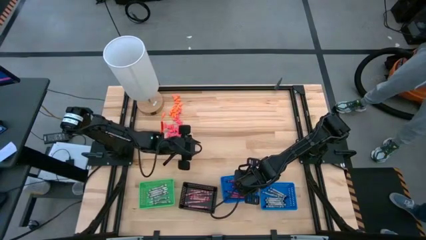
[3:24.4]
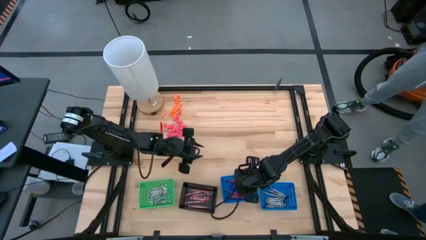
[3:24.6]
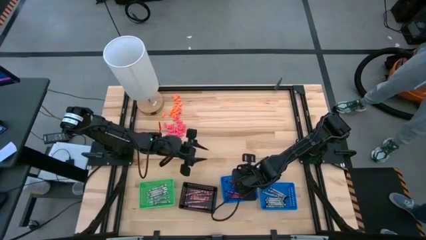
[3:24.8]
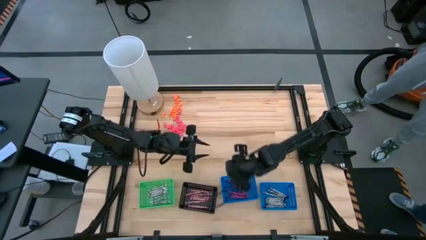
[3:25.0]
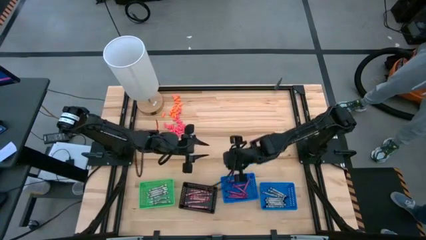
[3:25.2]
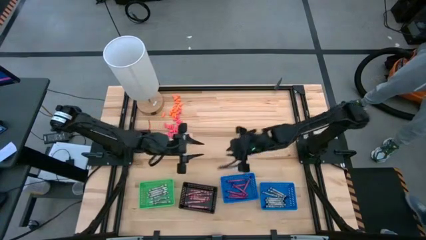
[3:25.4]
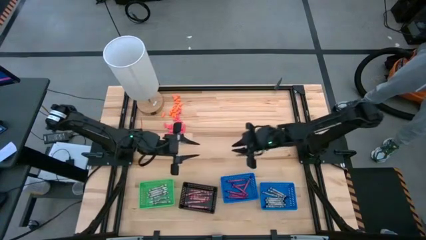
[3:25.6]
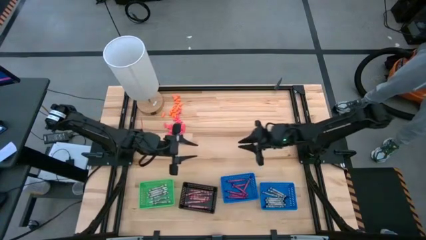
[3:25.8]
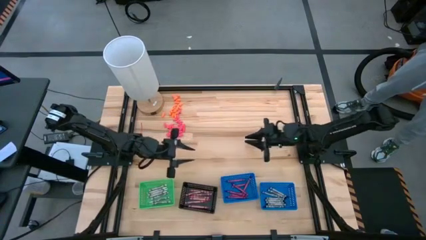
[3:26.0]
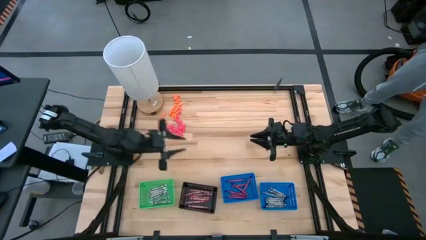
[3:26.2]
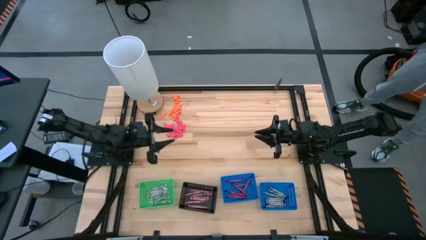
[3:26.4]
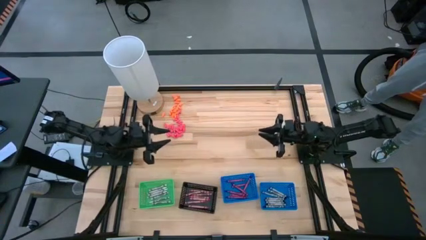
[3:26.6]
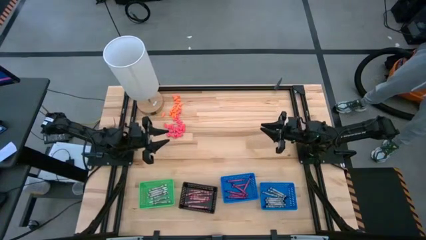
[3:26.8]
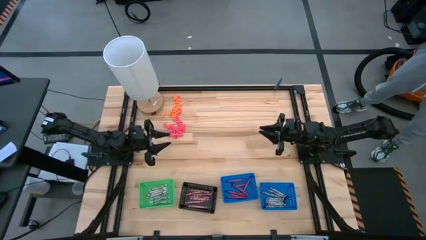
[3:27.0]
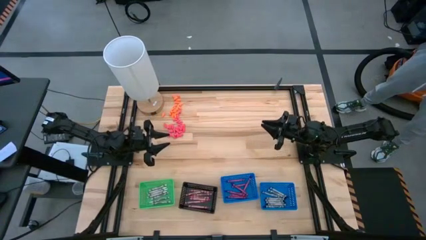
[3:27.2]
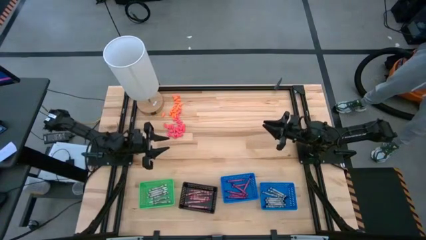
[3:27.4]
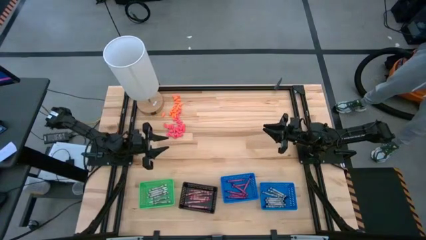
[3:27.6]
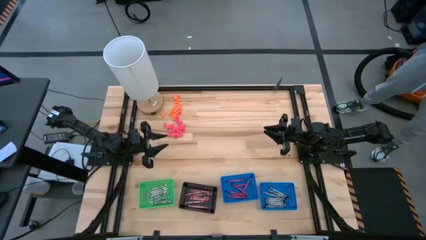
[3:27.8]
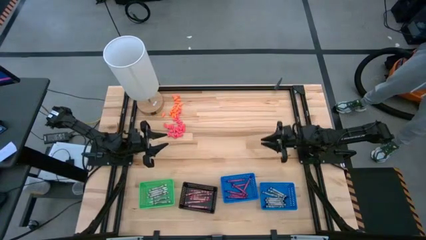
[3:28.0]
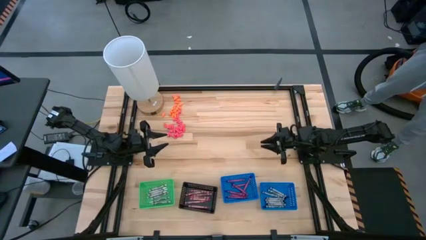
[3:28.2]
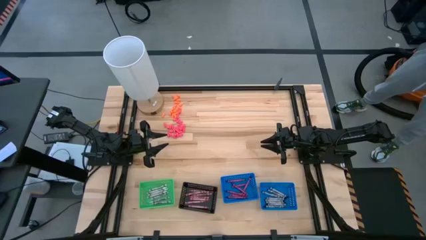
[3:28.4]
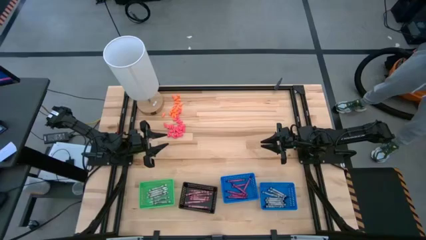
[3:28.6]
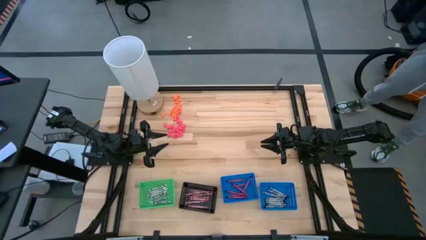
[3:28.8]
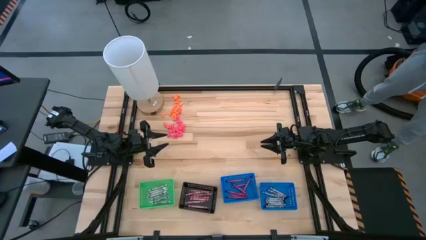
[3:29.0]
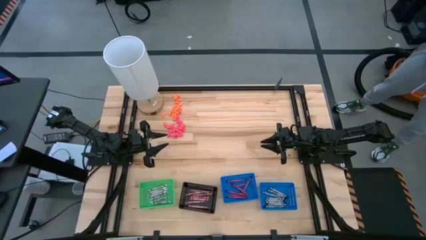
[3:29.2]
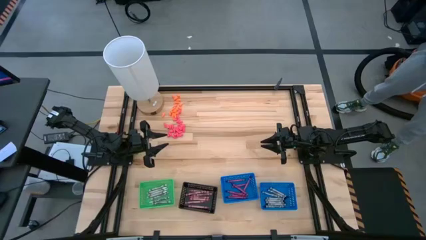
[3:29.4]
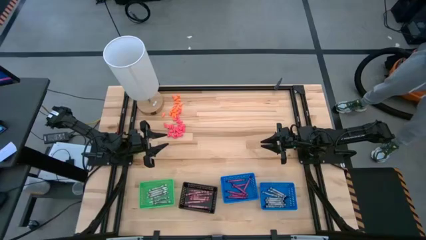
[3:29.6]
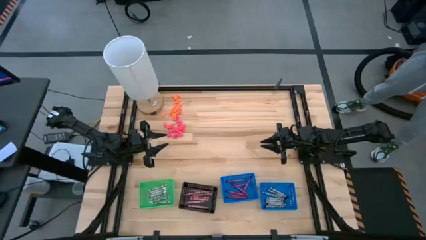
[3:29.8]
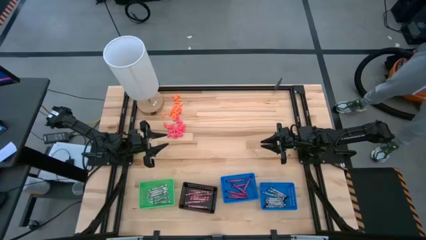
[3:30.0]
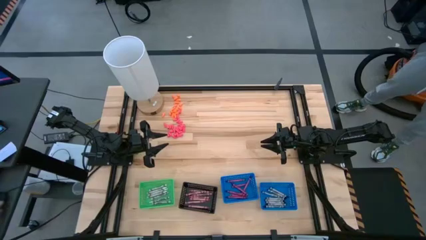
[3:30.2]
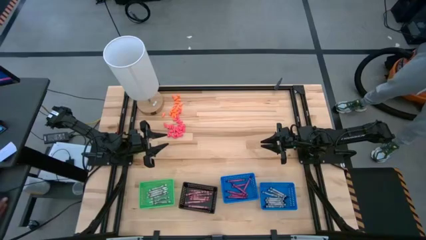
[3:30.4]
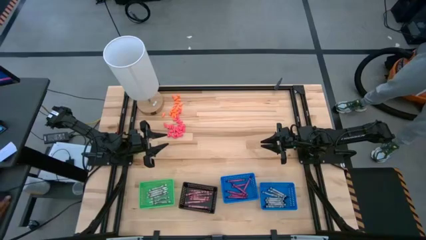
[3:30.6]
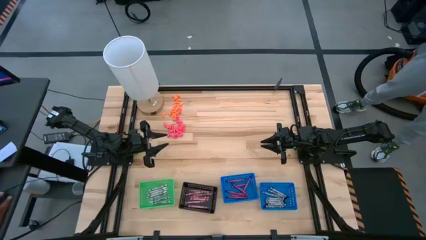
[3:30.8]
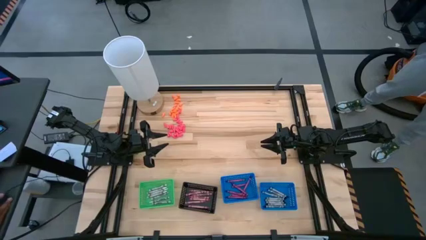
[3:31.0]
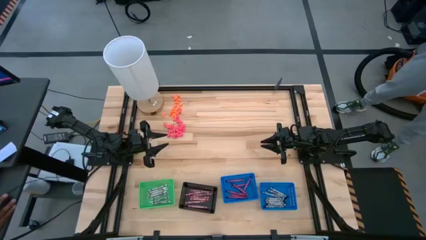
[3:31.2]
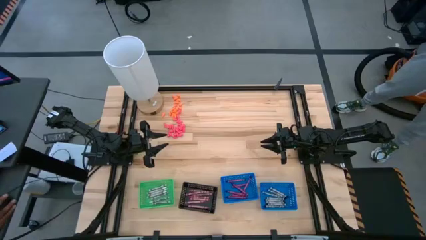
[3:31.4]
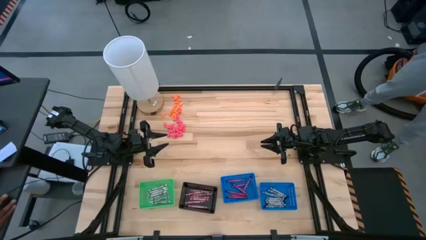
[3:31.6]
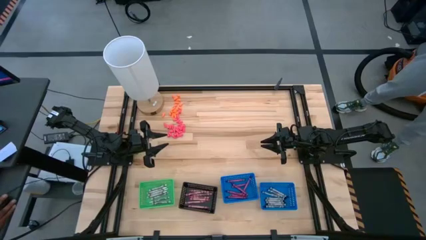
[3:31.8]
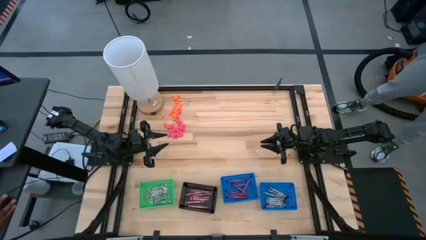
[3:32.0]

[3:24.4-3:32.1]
Task: Sort crayons
Return to Home Position

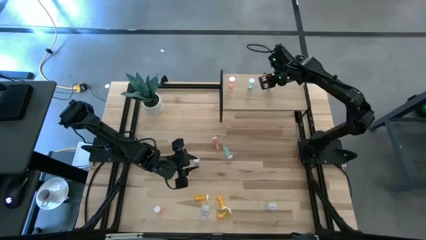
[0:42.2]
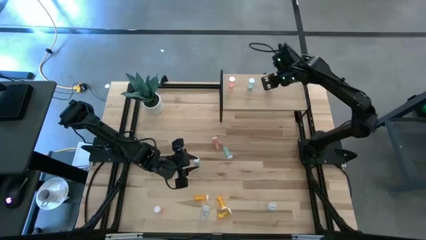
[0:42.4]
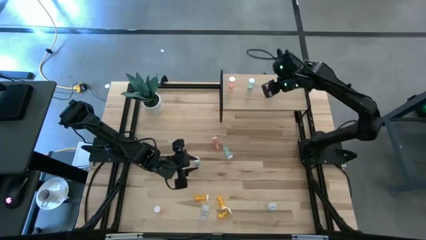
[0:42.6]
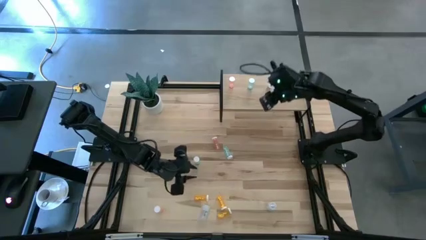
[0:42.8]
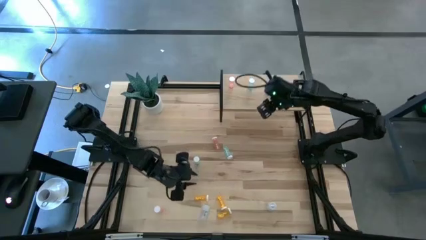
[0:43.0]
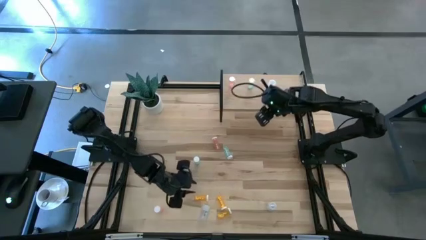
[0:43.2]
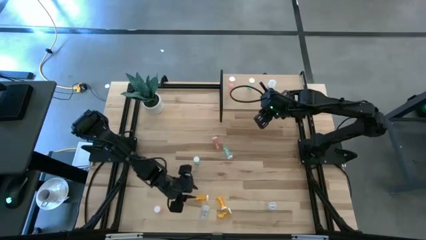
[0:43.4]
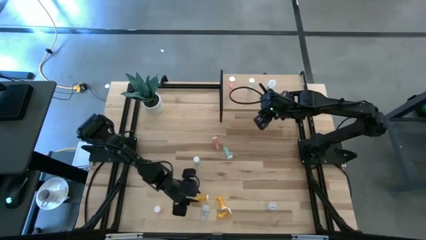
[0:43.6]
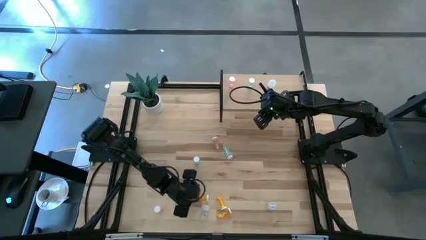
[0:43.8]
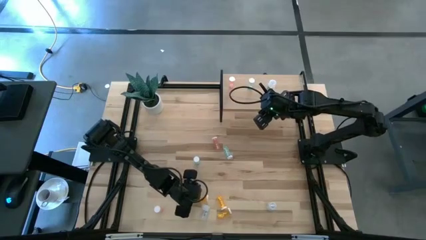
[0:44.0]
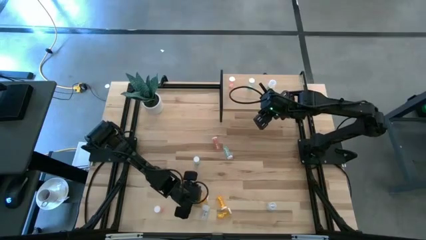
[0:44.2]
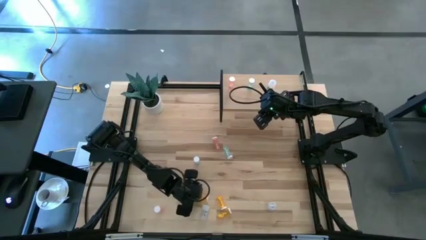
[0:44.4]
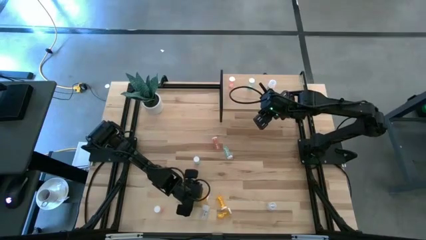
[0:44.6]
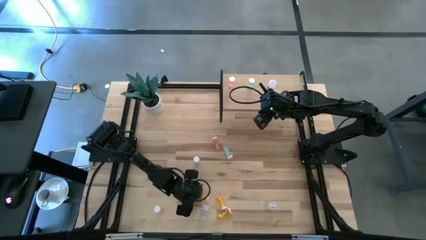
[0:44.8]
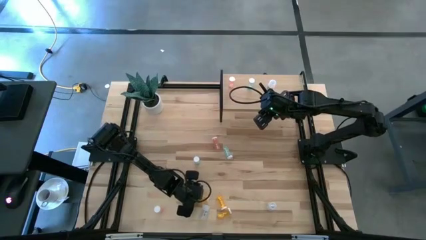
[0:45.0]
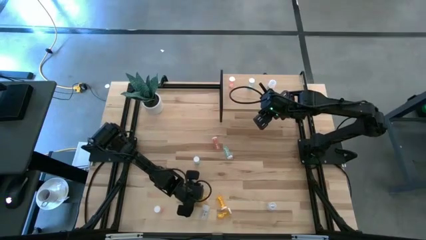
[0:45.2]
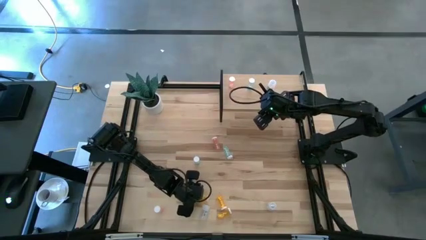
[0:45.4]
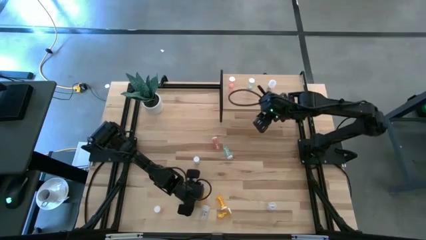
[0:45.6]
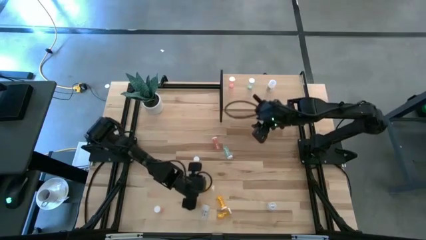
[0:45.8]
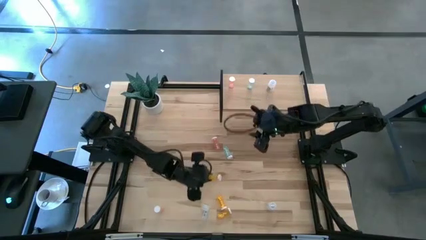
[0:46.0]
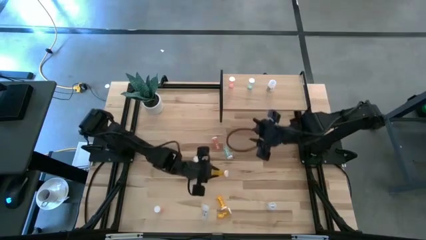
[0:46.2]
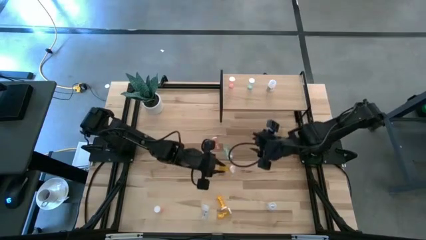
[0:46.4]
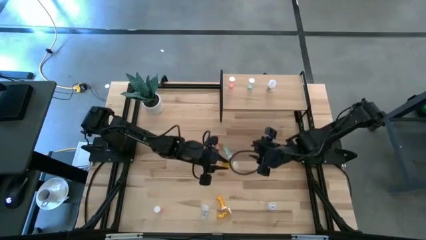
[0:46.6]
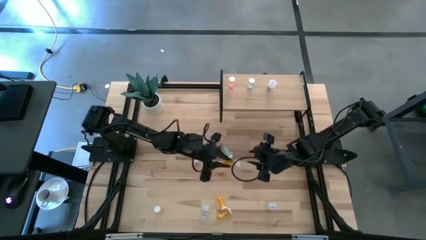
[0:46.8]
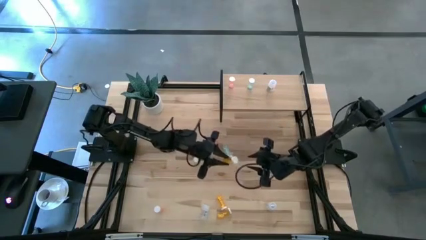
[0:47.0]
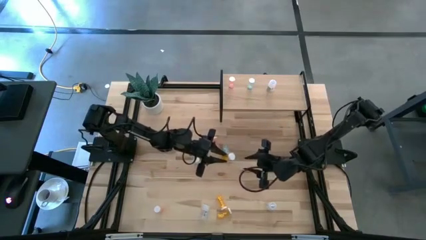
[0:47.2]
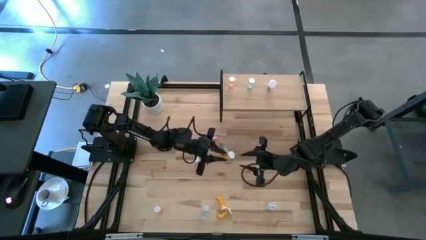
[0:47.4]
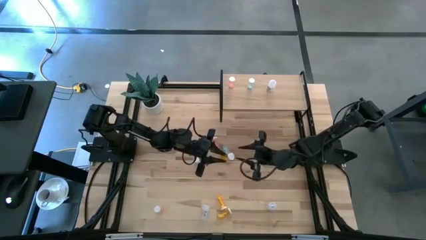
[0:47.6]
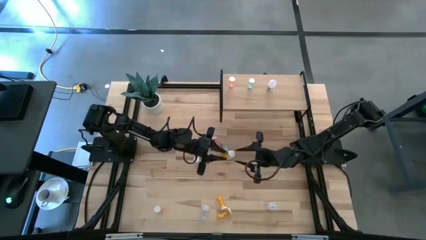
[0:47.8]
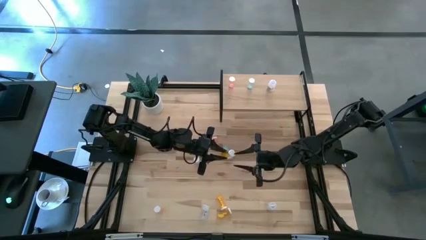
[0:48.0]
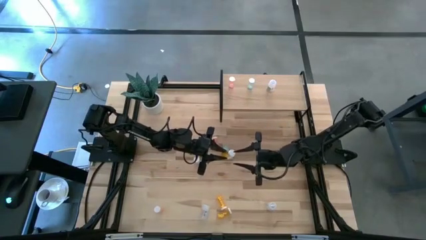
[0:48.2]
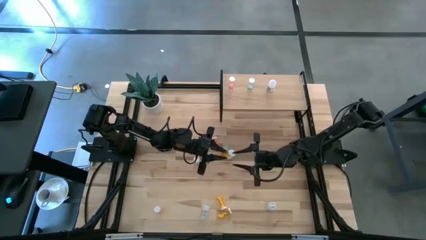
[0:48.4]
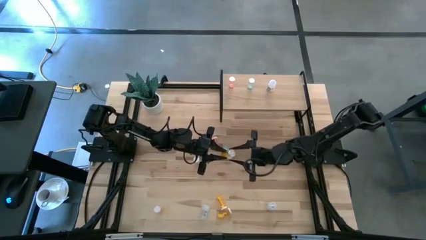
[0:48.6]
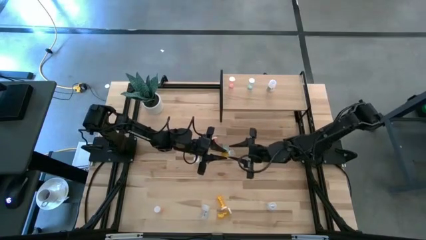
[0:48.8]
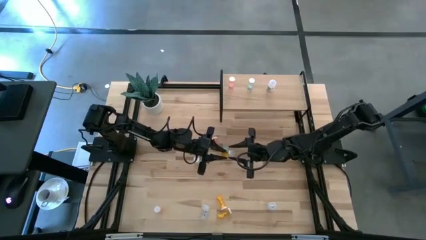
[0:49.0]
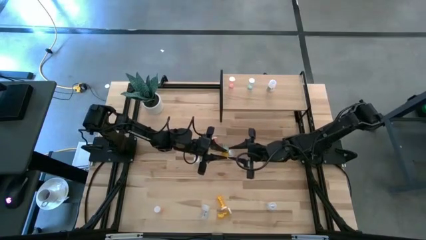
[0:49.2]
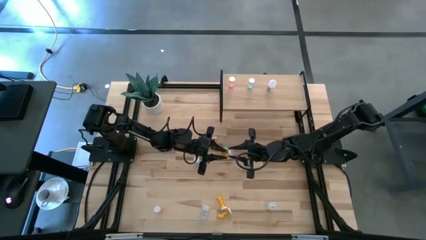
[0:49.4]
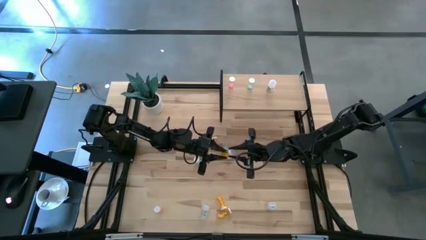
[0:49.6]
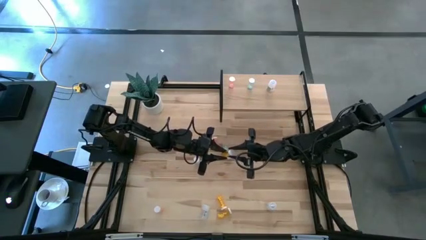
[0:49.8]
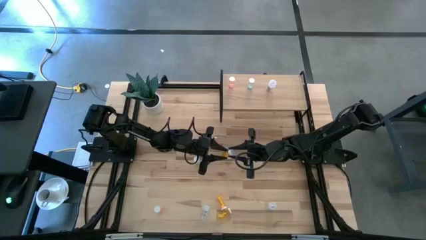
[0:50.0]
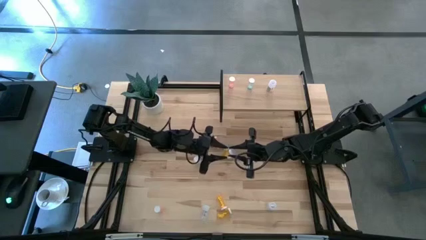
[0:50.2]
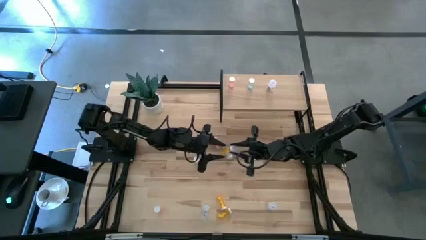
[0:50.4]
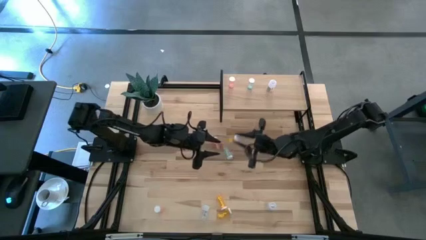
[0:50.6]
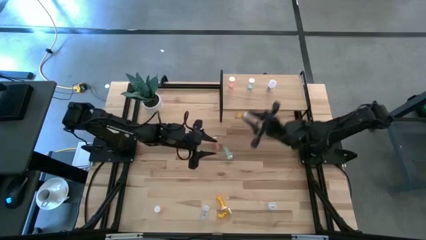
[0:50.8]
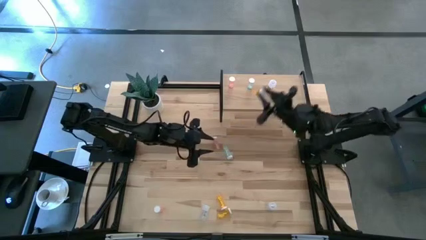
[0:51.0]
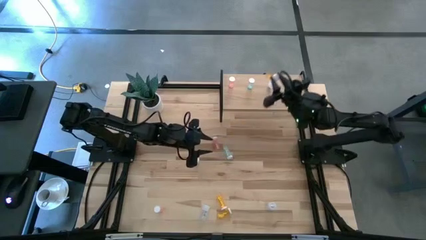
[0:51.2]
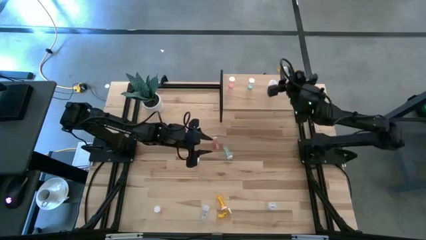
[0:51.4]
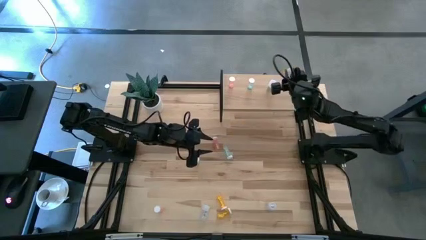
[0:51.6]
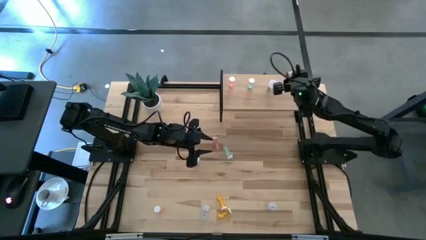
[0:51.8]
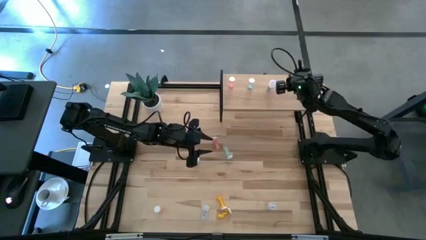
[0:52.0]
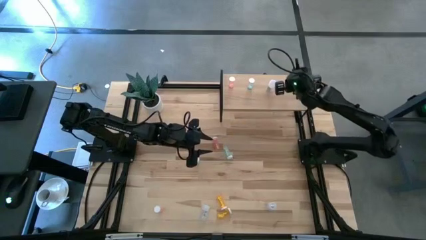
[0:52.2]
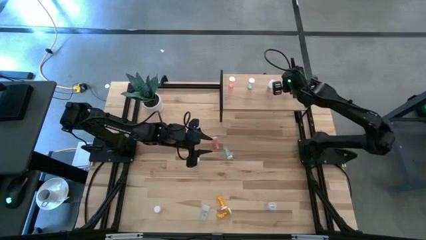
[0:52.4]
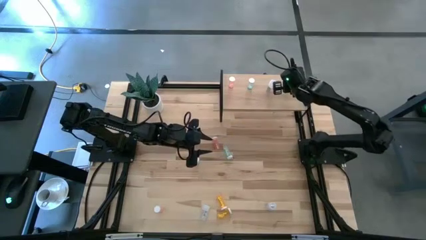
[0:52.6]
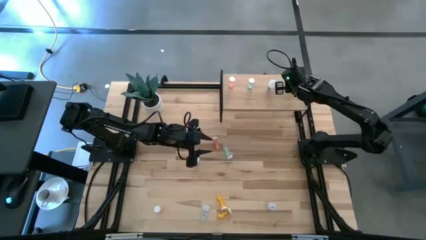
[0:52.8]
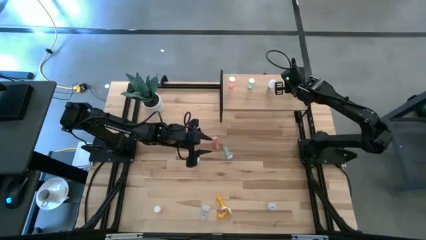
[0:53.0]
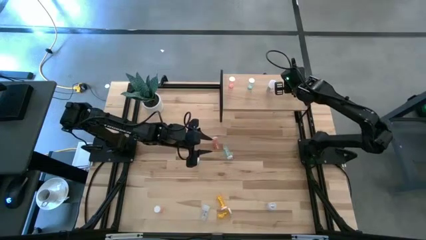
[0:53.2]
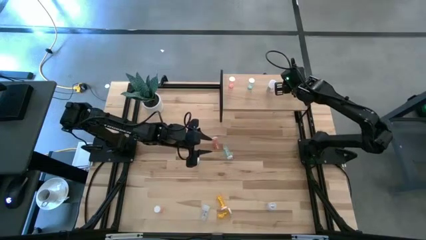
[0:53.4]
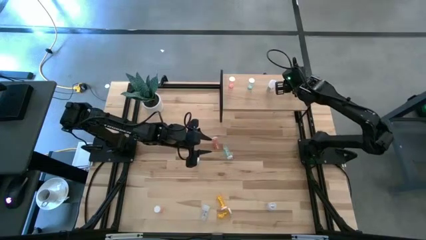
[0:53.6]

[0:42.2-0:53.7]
Task: Pick and place medicine bottles onto shelf by color
Put the top orange pill bottle on the shelf
